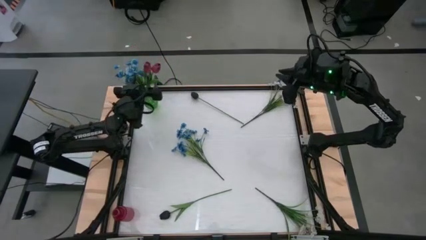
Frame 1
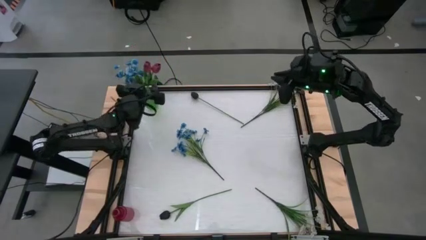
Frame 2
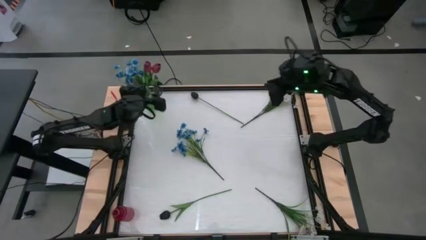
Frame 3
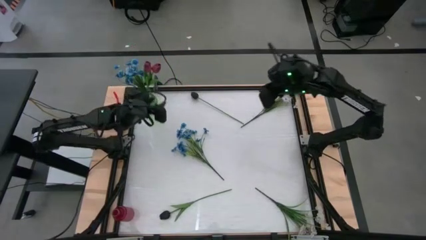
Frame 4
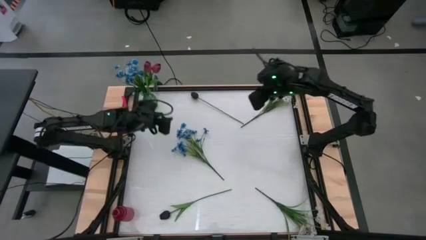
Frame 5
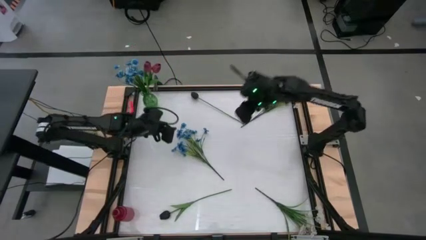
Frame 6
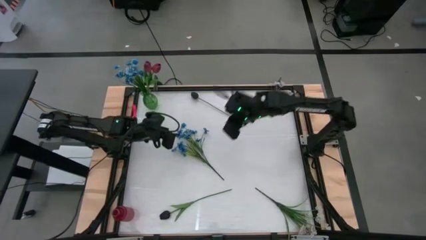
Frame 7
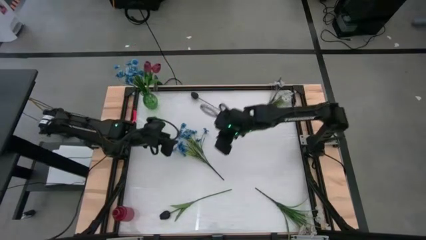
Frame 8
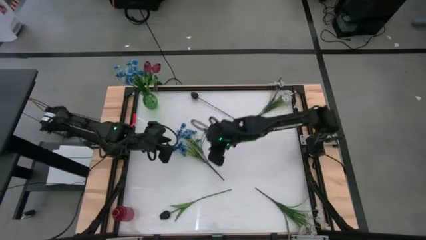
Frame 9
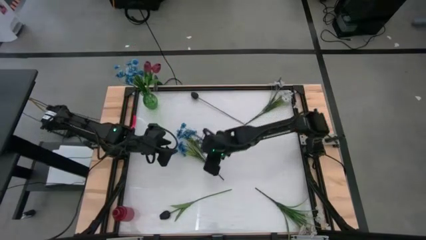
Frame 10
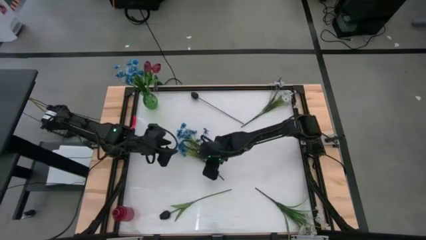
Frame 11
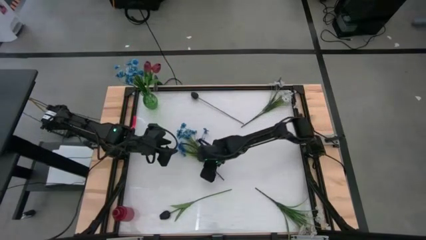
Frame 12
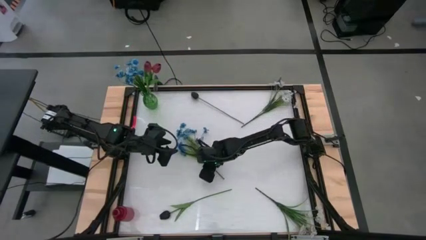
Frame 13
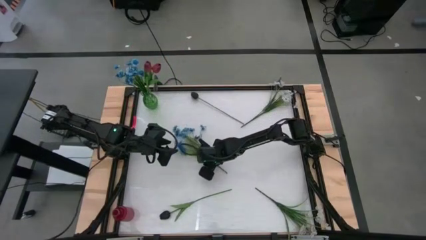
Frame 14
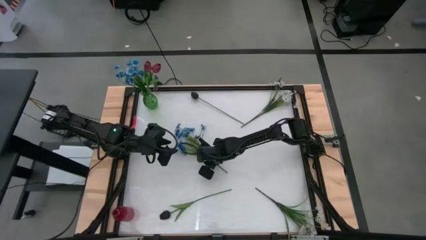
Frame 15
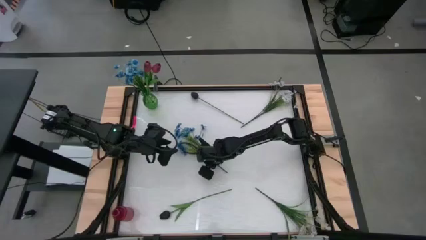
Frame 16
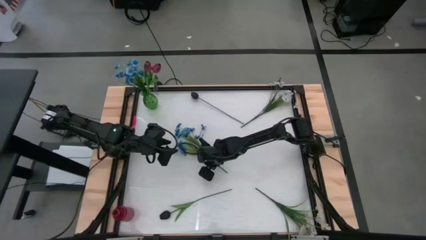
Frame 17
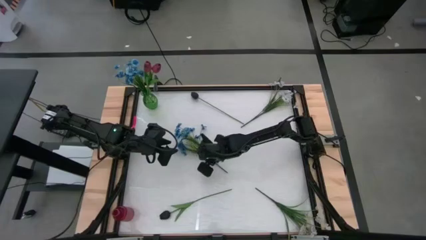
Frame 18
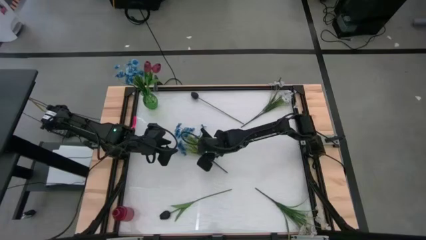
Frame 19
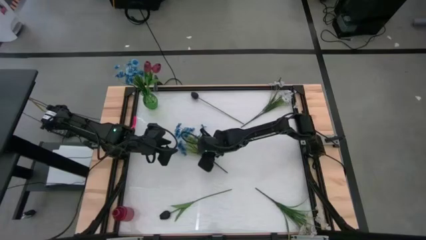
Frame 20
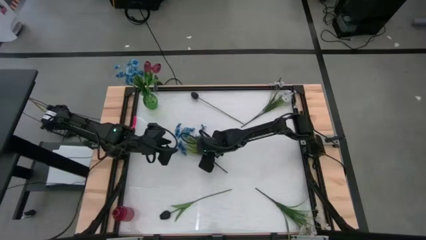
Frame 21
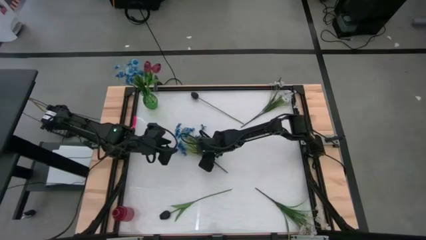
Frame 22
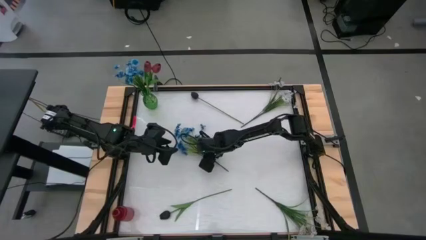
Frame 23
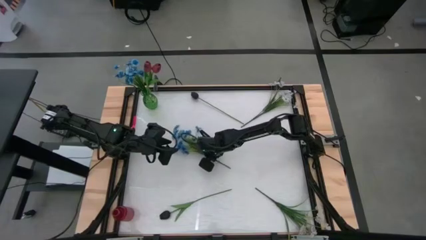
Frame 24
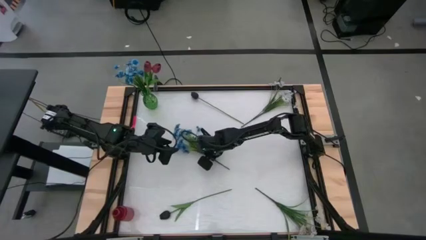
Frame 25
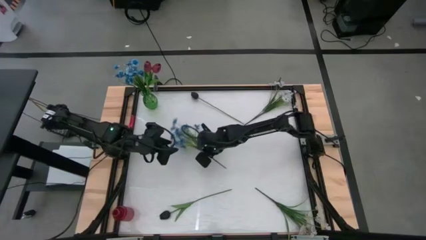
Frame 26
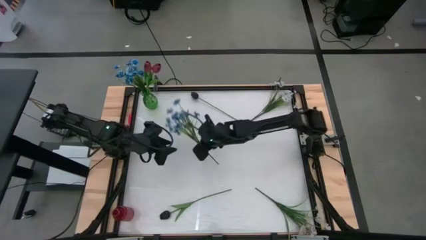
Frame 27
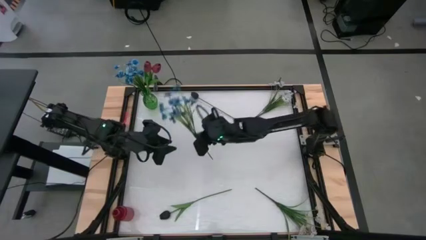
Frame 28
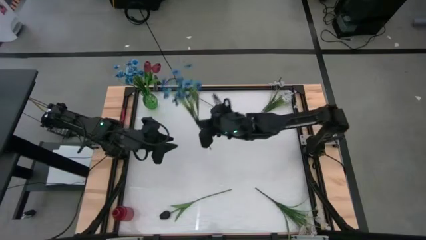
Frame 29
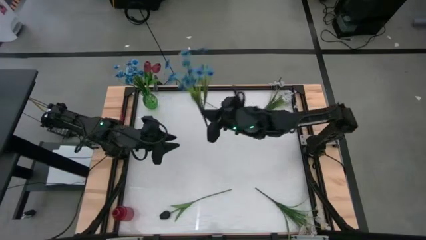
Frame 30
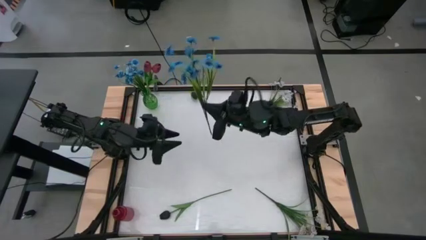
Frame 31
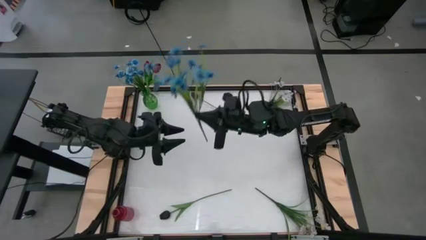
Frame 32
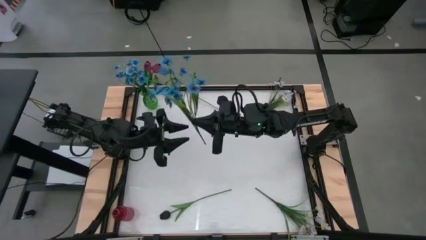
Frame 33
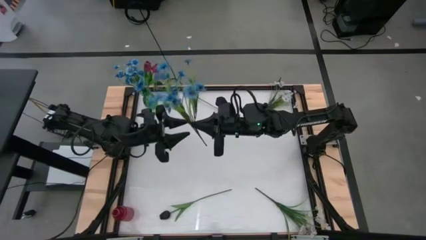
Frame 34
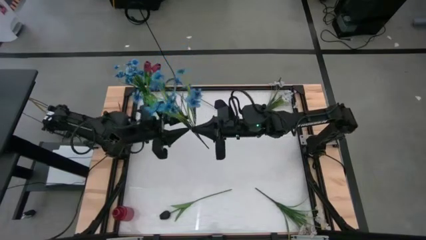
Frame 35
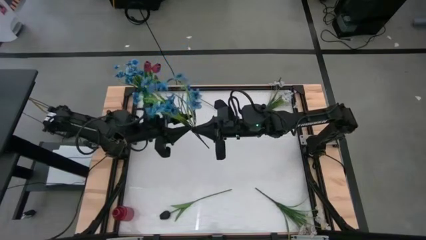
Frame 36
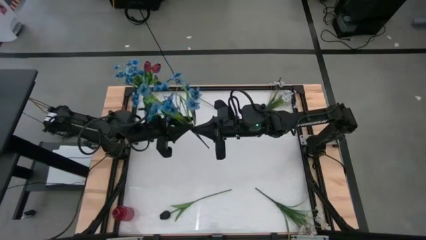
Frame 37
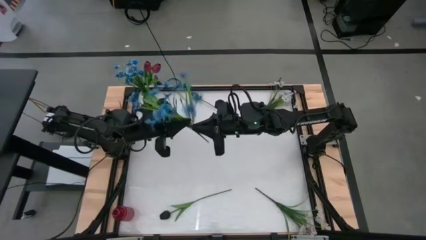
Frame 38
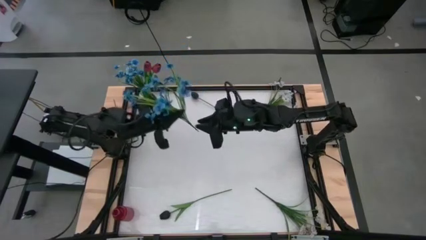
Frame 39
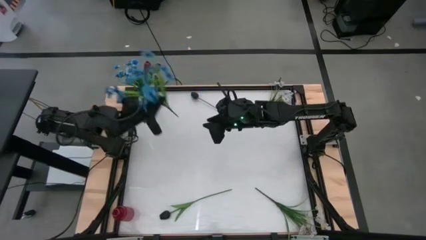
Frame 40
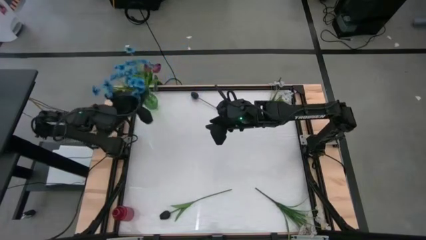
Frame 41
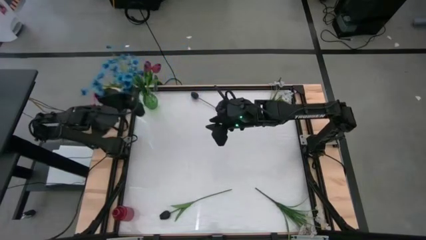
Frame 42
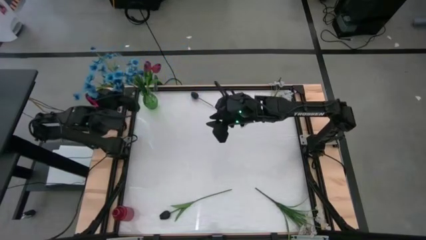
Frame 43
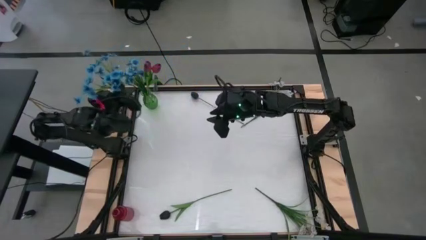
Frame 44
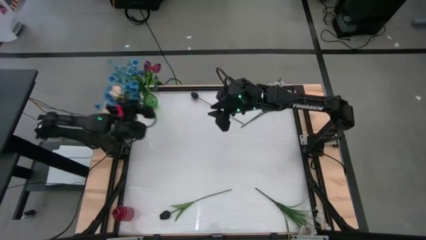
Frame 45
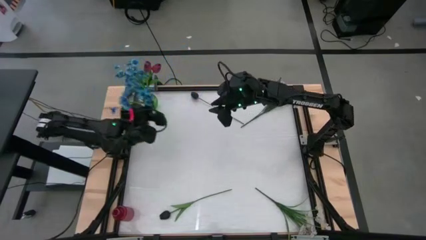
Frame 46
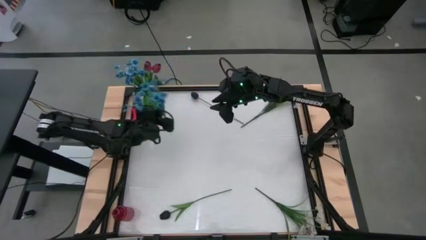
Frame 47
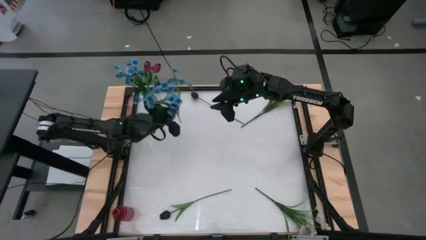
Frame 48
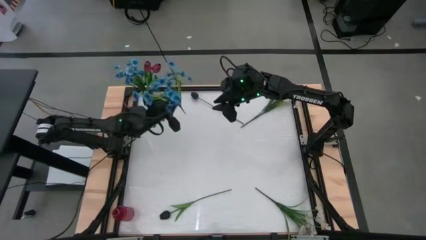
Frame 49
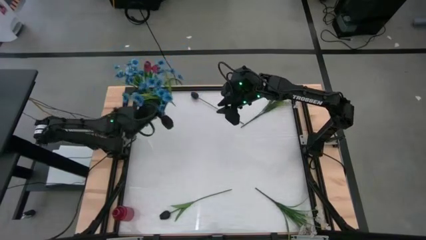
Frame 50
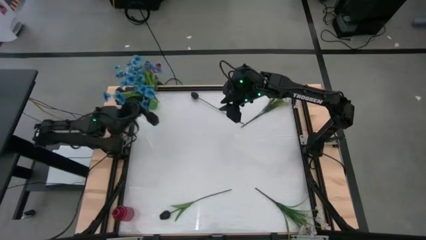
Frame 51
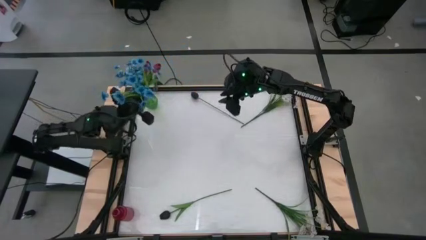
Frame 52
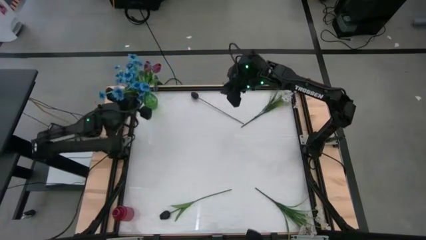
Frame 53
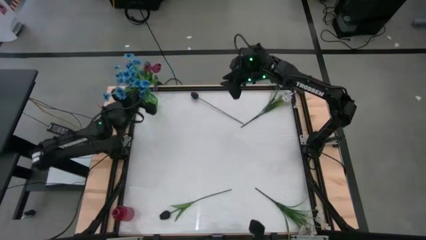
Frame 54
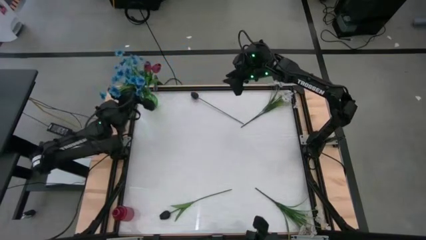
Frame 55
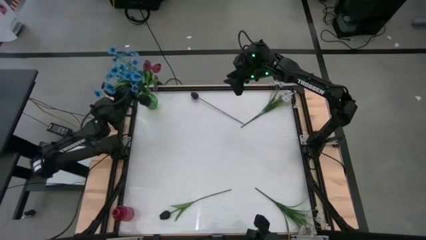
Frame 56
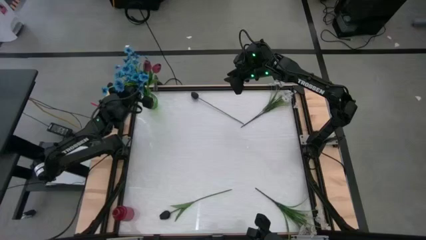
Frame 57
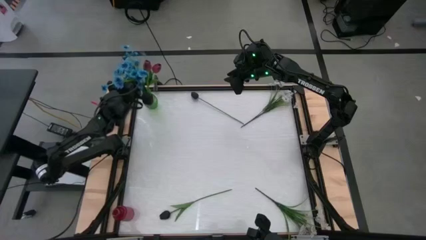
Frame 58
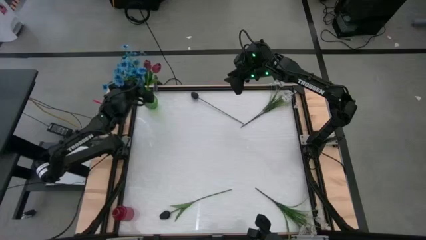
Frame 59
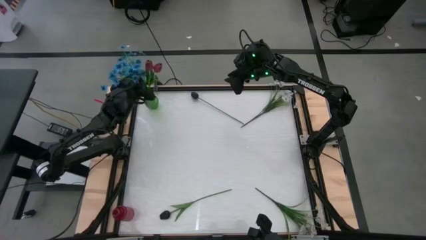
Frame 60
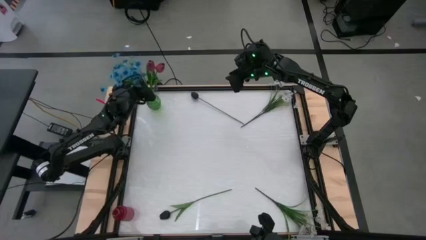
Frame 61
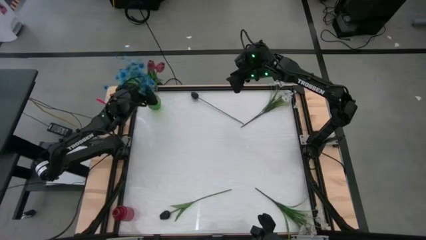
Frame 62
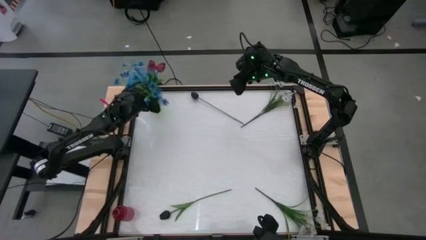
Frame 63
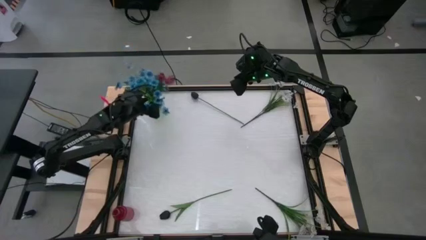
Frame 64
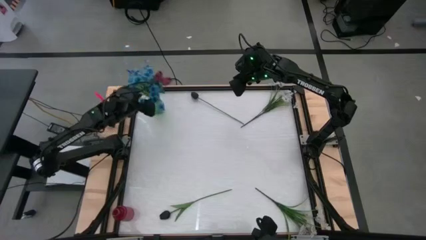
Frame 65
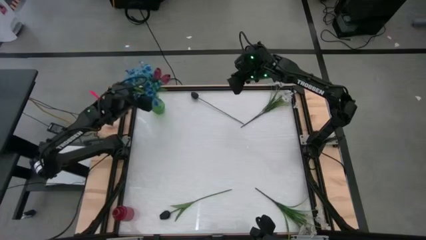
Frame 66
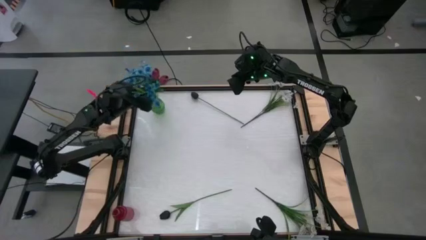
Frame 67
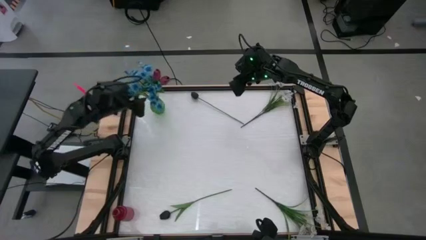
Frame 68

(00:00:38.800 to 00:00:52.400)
Task: Sort flowers into vase by color
Put the blue flowers into the green vase

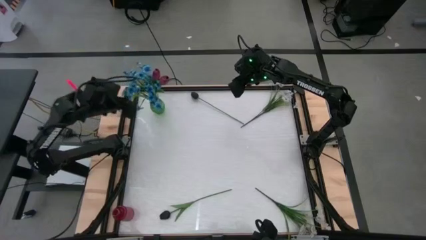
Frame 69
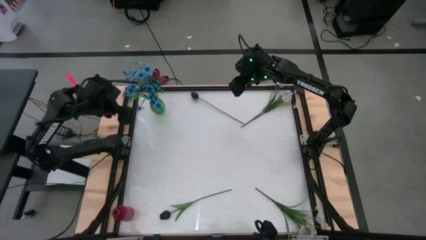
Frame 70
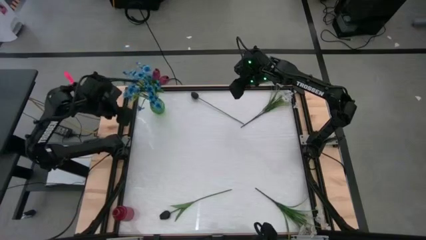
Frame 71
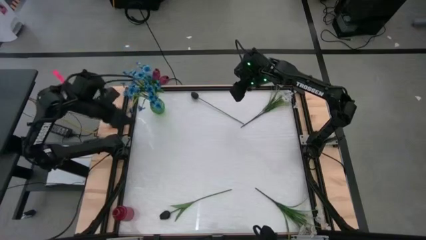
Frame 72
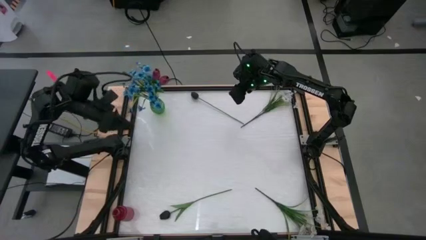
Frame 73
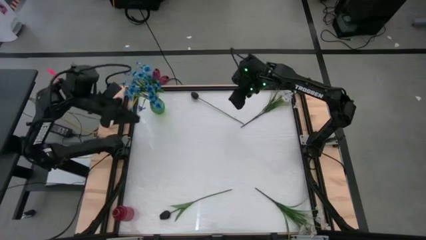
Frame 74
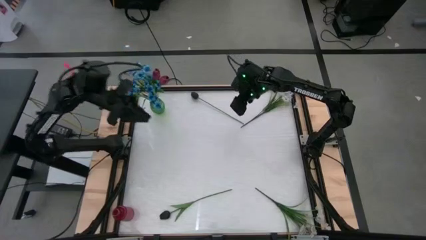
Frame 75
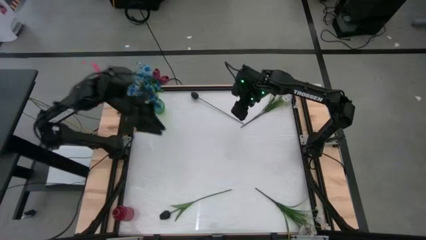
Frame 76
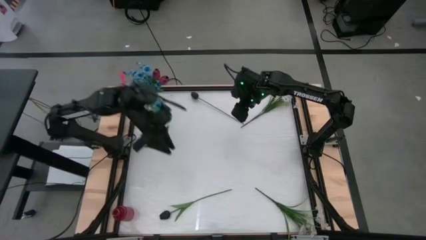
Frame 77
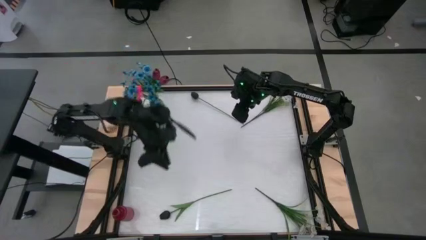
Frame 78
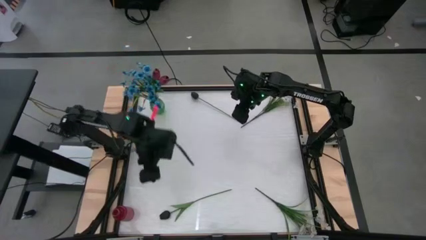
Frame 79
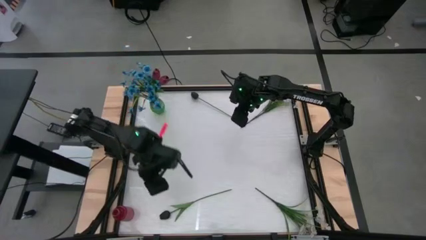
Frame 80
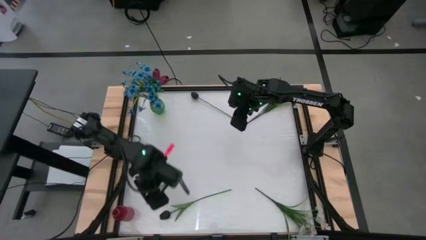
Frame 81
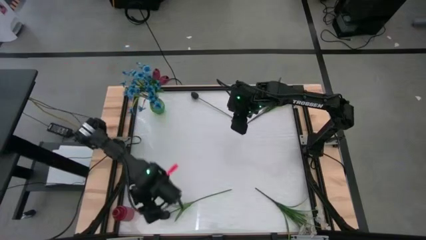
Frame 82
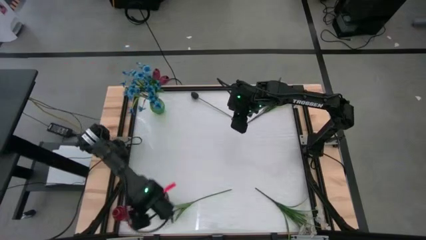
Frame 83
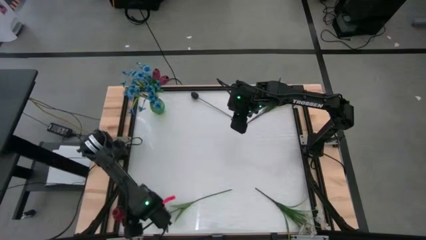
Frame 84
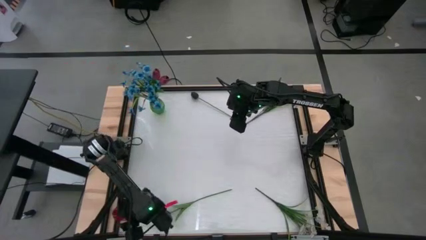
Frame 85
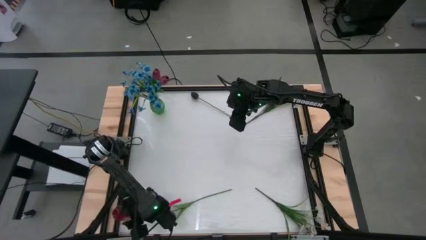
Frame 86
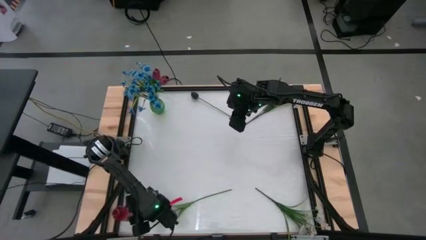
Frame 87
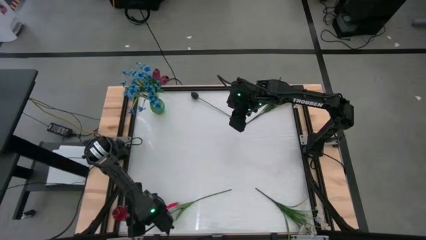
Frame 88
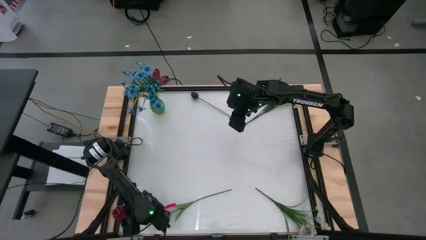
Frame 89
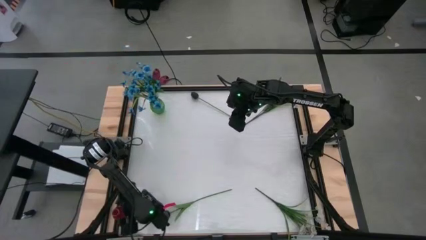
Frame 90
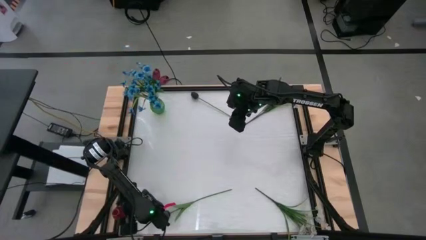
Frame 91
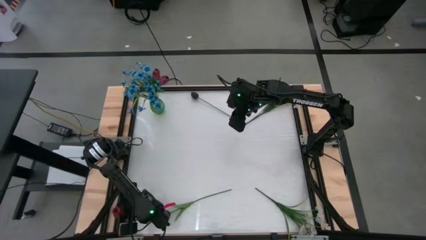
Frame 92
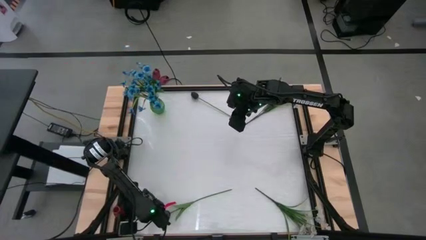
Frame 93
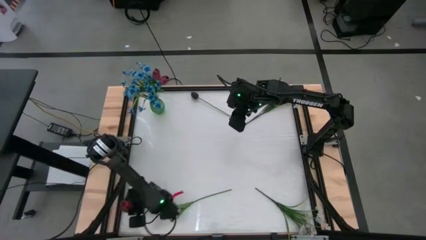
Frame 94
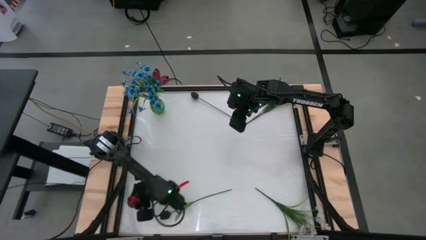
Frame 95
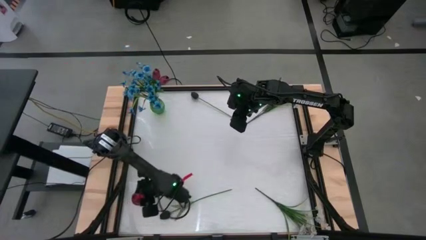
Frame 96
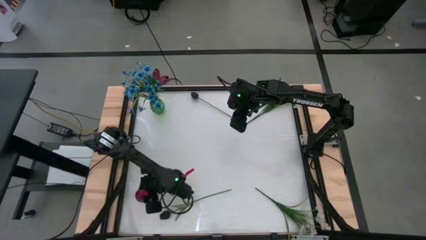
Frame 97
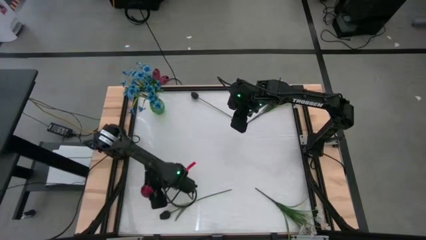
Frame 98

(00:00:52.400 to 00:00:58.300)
Adjust the red vase
